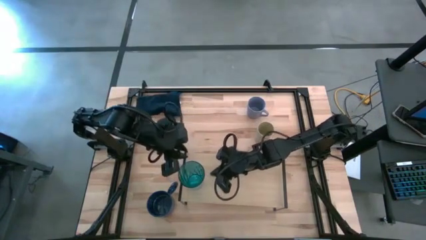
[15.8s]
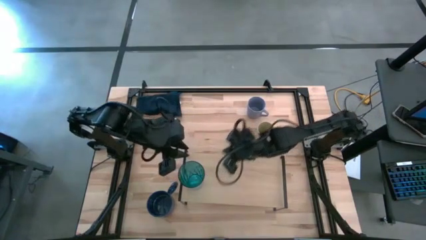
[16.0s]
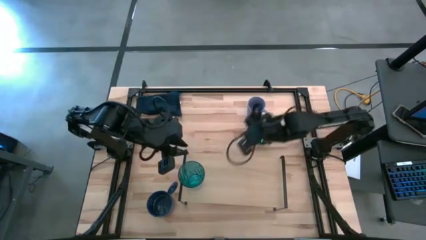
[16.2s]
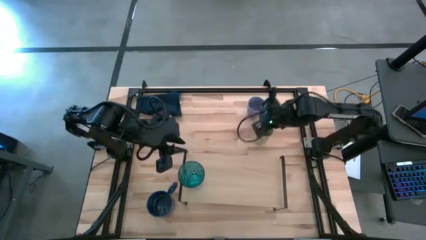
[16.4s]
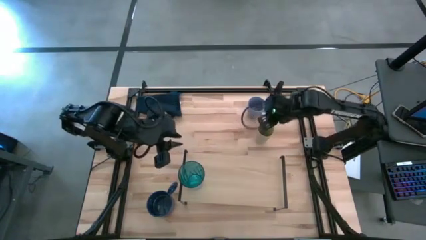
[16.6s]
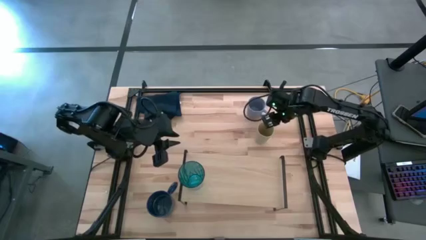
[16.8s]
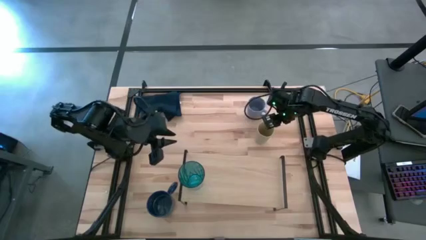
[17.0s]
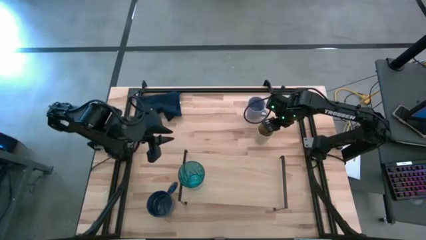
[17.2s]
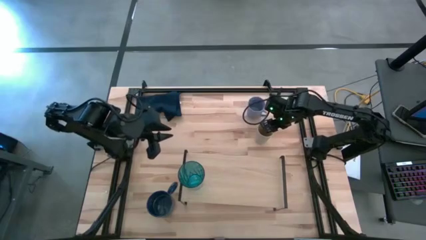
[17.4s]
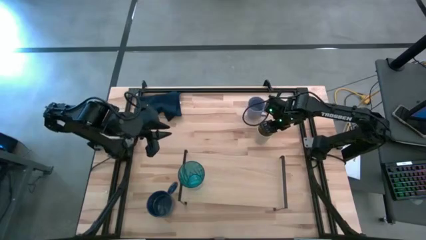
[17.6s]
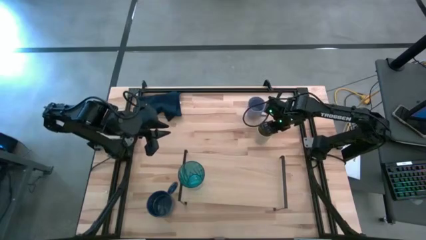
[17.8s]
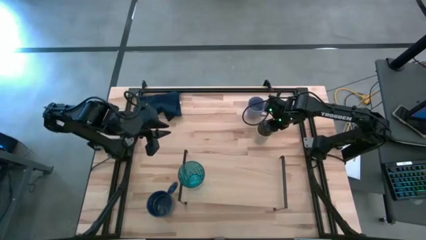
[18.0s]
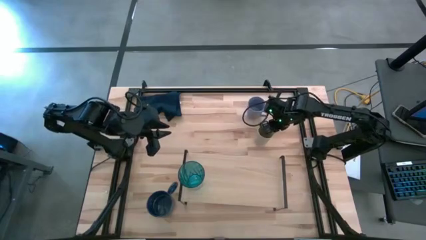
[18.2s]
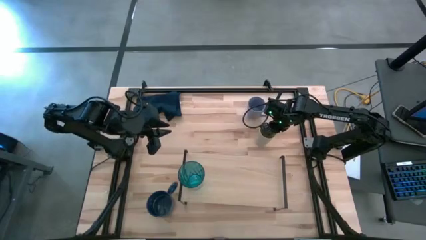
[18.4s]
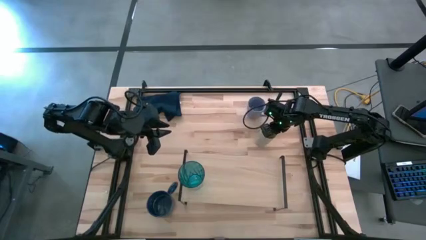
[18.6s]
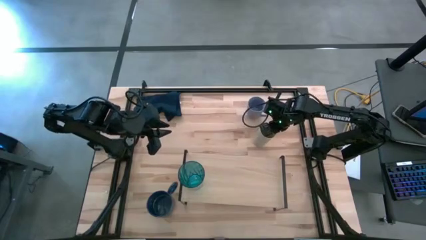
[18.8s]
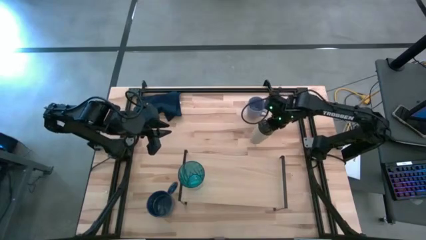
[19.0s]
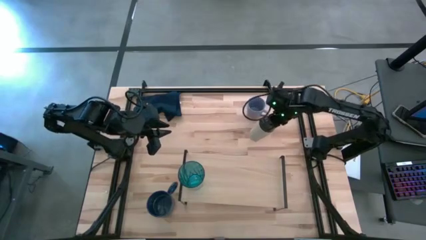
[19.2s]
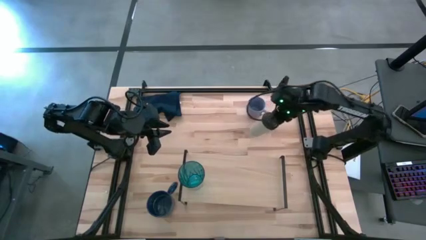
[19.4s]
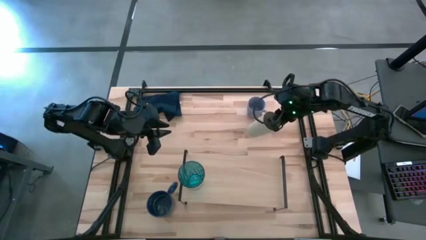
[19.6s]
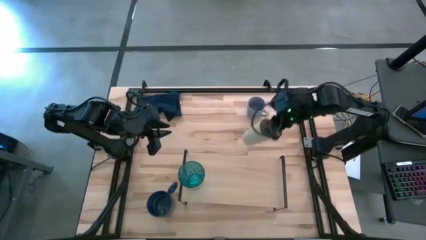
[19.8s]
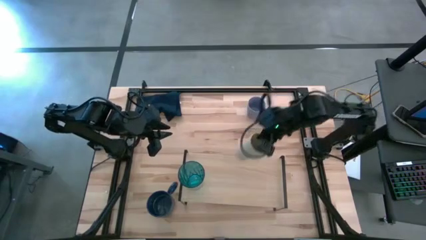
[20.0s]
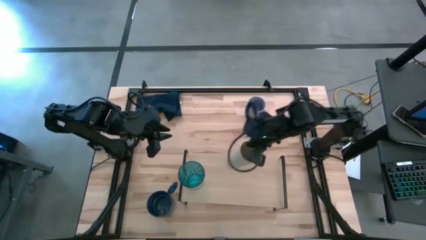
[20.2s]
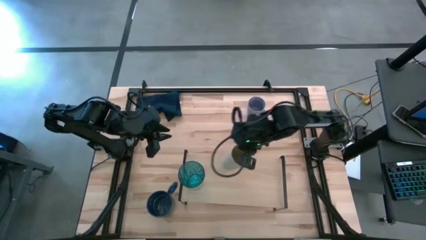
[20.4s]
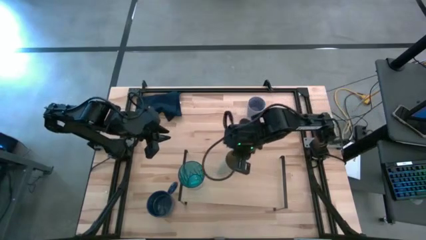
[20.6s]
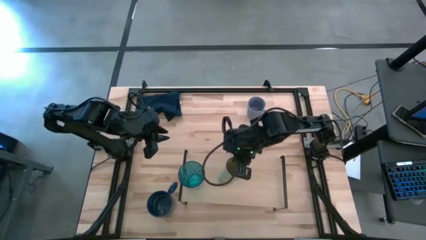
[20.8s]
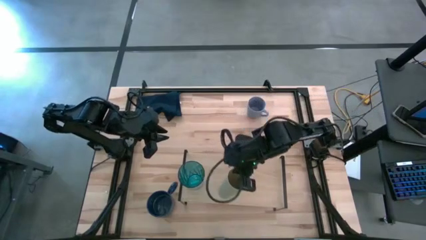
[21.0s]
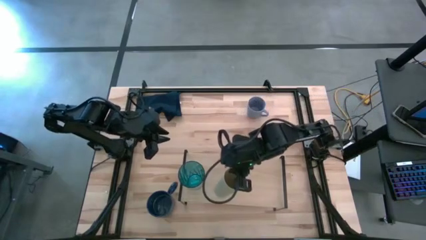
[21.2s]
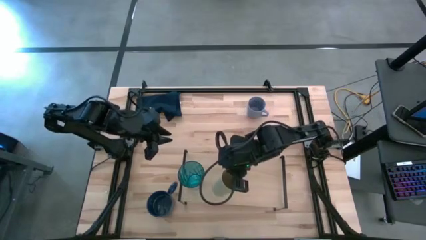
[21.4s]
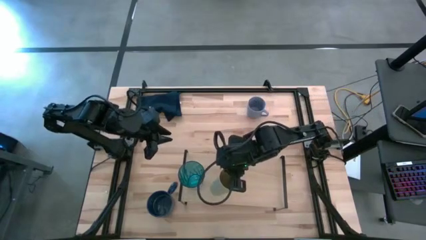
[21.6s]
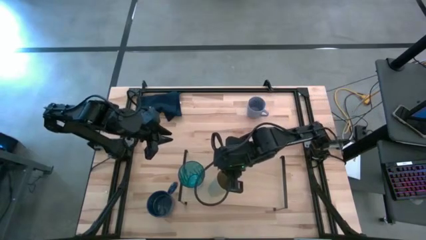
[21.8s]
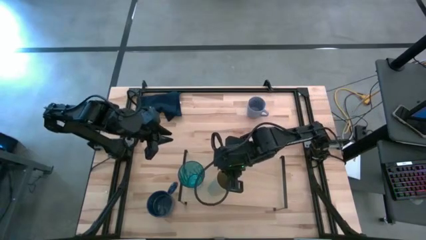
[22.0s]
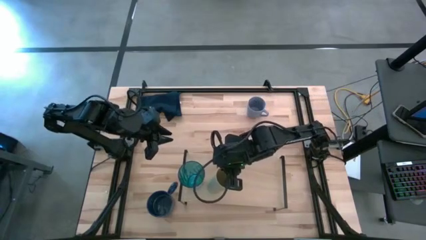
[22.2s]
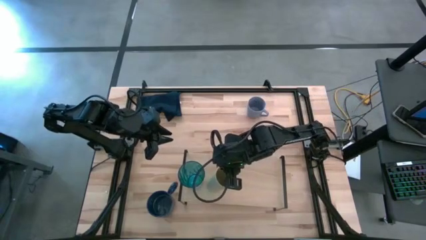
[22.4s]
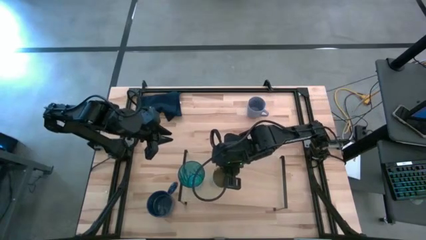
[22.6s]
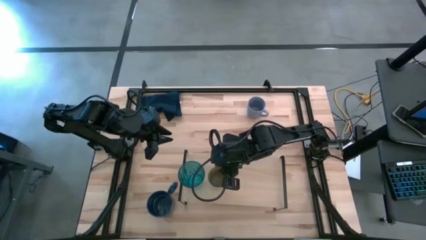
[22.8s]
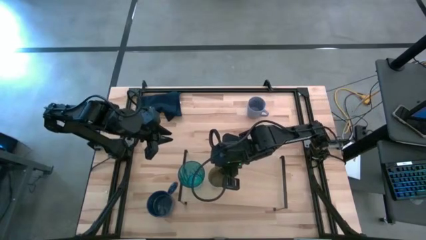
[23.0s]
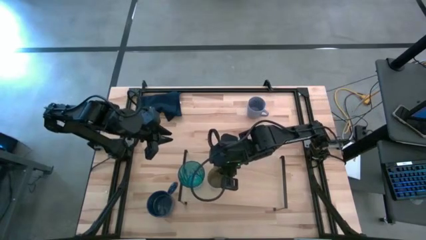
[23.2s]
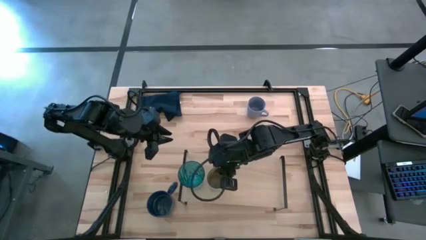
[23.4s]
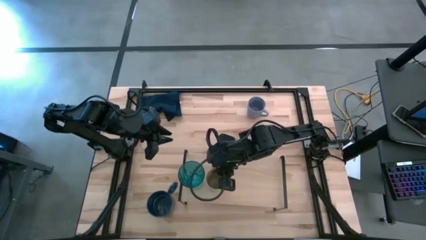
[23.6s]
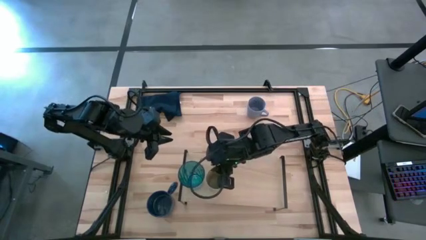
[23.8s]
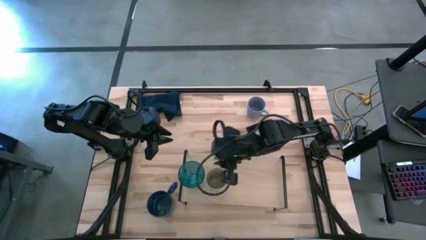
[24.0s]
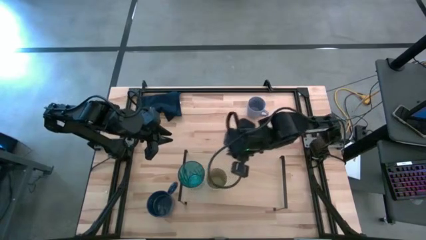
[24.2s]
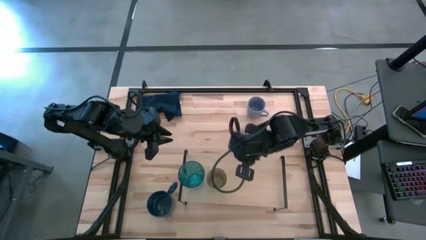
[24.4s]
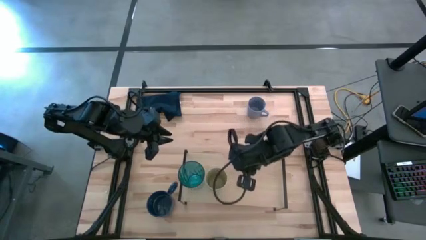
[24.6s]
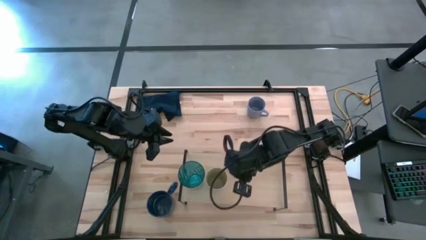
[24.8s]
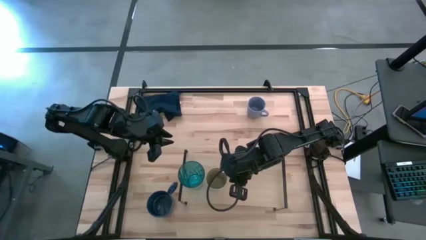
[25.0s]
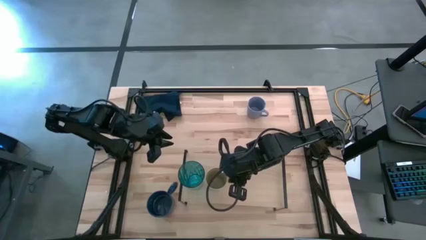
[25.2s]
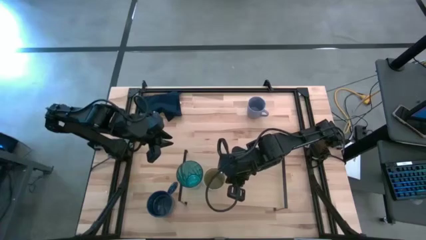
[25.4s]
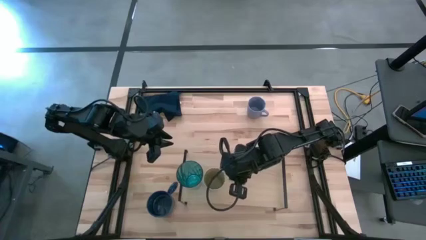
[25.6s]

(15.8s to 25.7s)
Task: Stack small to large cups/mugs on shelf
Put the gray cup on the shelf

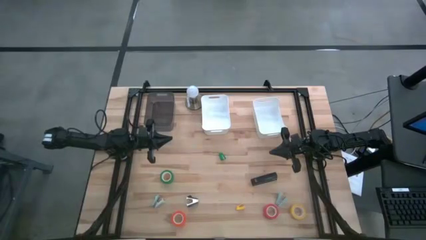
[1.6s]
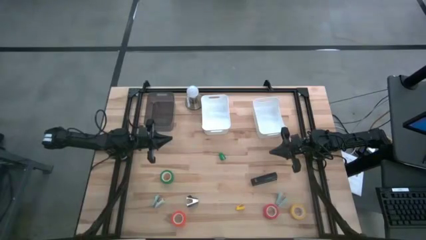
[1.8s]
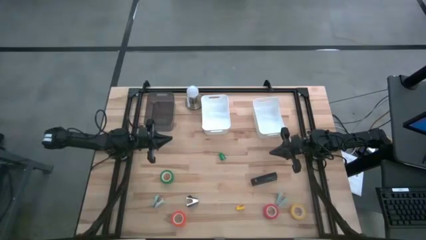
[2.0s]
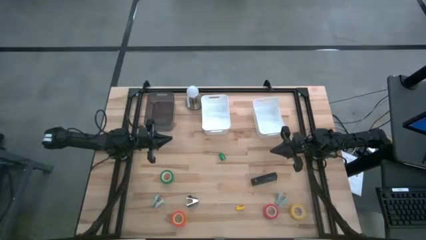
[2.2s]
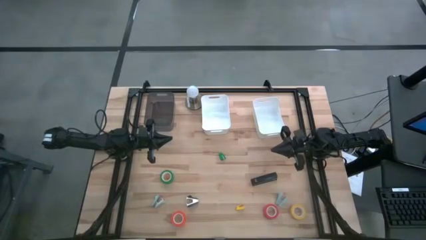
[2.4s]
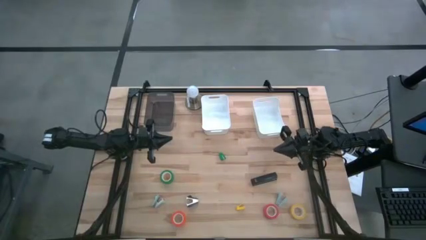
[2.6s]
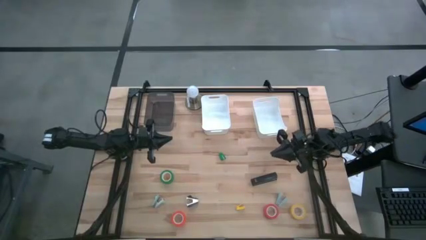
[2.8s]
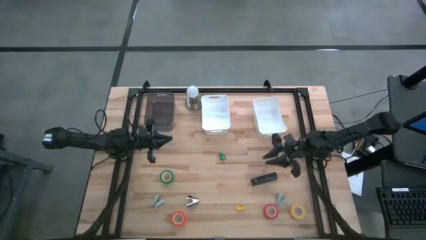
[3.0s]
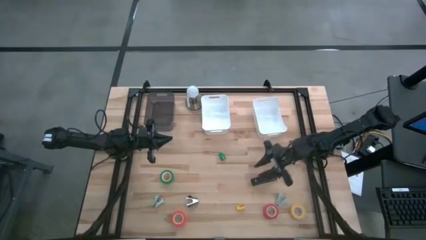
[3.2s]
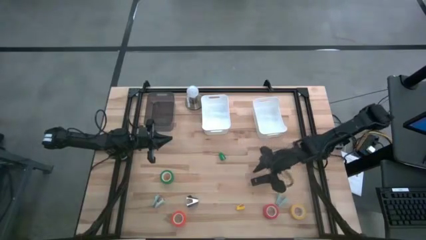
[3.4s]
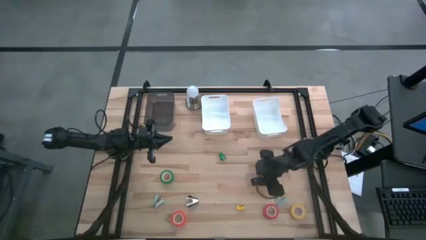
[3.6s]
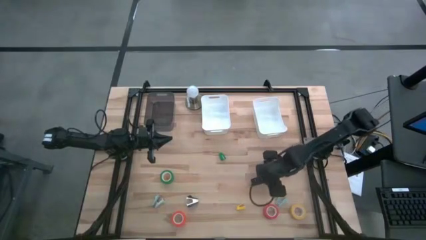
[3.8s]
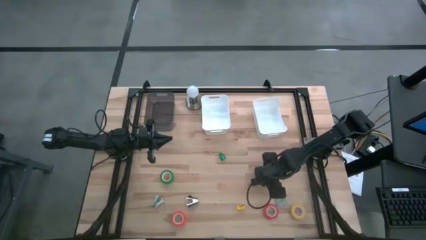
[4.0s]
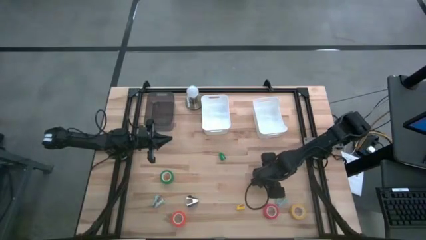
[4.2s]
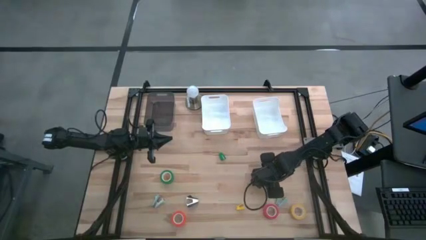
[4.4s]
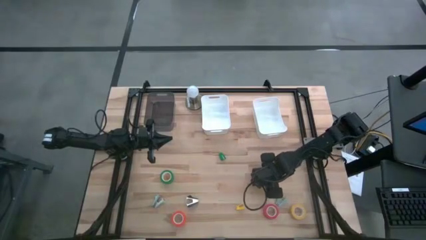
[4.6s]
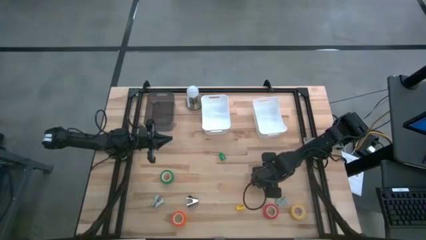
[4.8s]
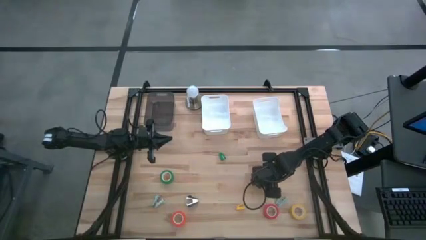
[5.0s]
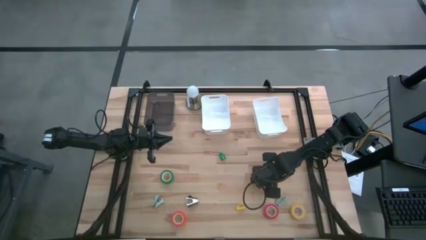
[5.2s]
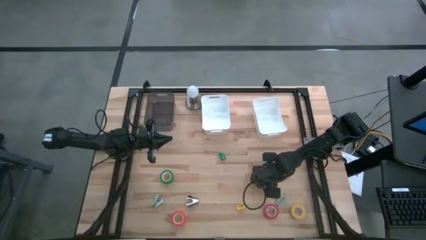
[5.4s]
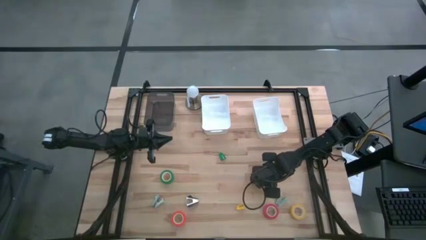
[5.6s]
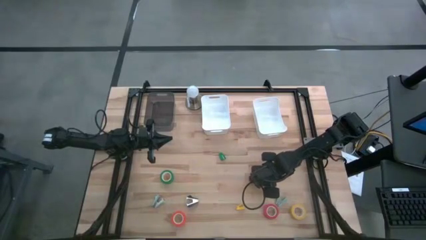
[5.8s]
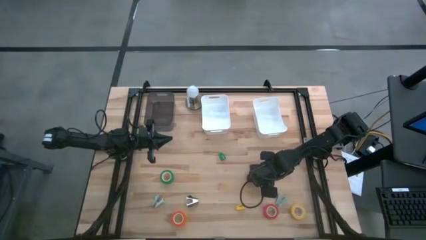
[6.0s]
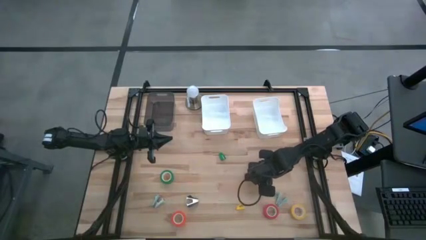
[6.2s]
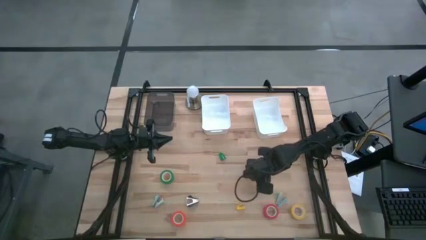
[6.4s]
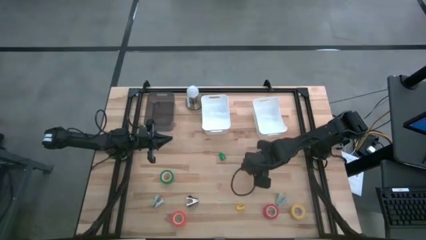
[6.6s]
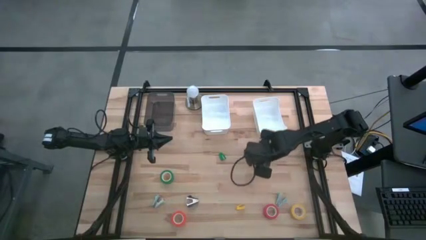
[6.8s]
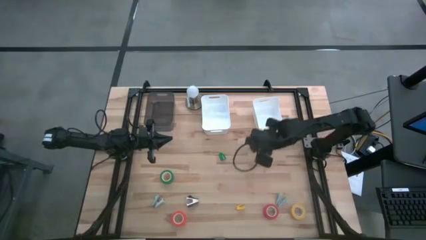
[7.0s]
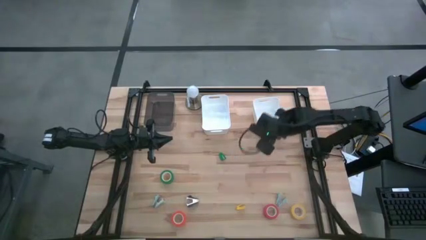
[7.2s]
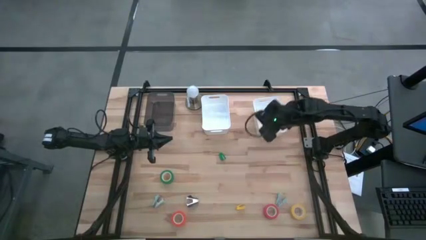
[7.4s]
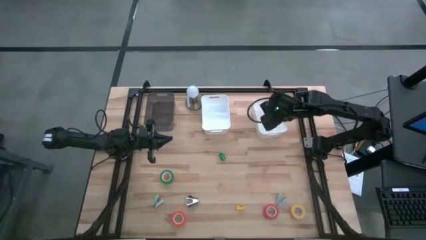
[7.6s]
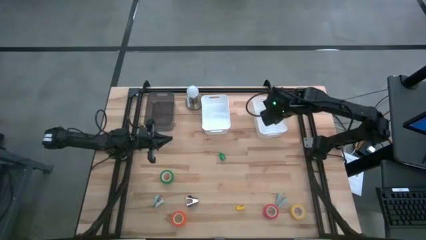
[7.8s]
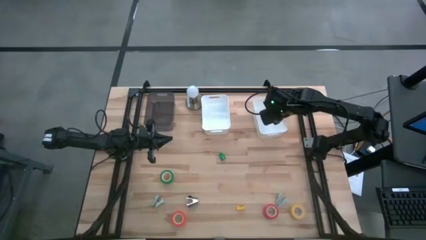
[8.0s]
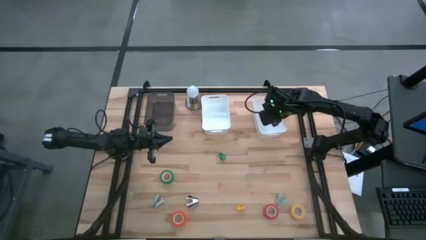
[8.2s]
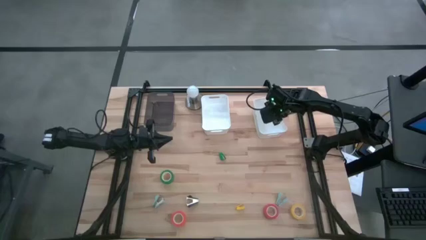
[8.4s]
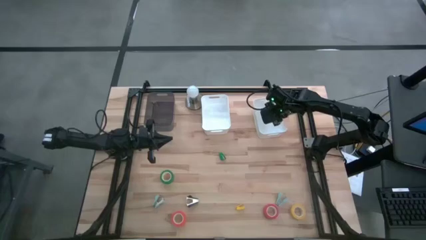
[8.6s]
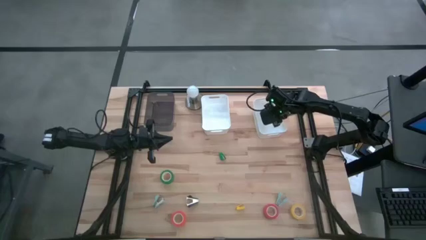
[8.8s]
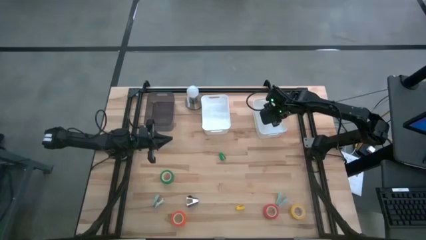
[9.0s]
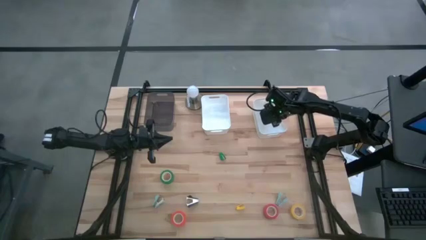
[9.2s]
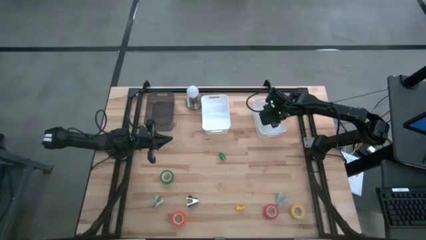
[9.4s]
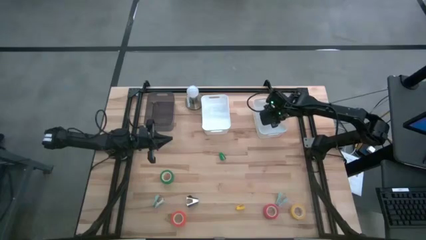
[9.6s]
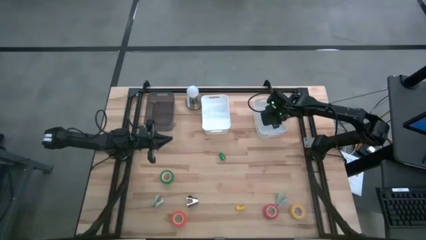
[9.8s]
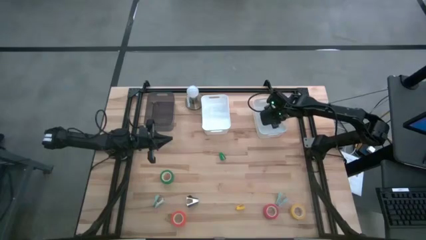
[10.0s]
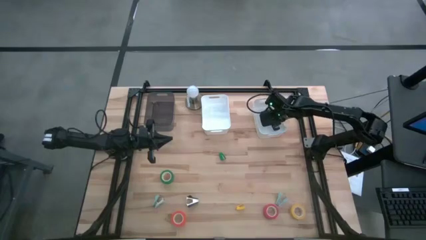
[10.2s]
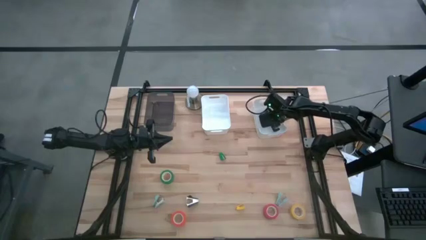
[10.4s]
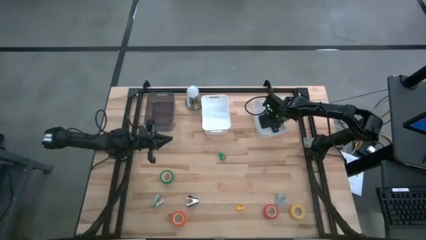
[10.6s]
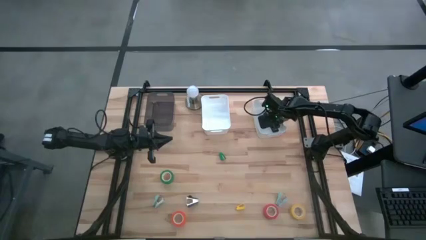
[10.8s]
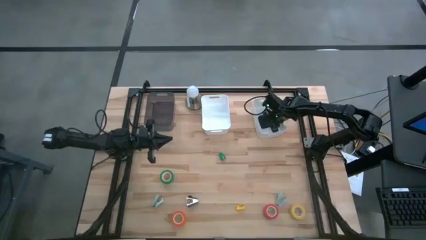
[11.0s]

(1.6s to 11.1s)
Task: Pick and place Stapler, Stapler remover, tape
Put the black stapler into the right white bin
